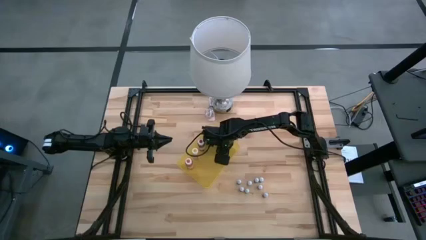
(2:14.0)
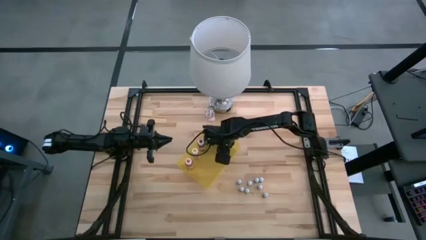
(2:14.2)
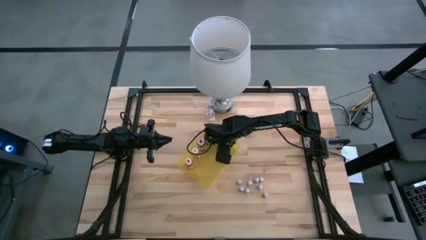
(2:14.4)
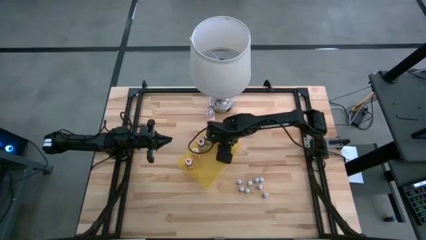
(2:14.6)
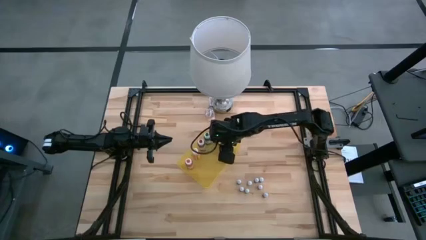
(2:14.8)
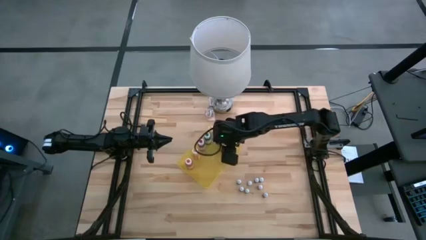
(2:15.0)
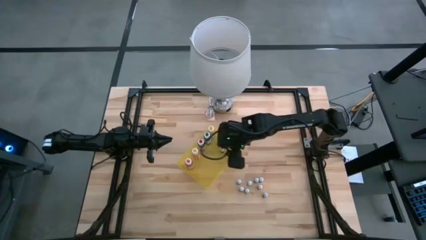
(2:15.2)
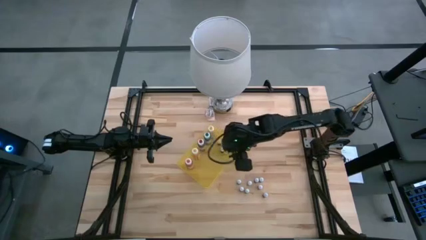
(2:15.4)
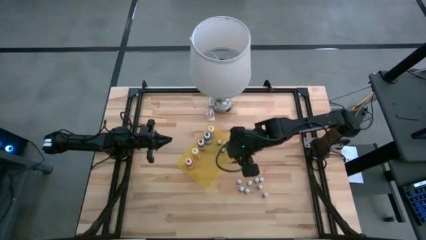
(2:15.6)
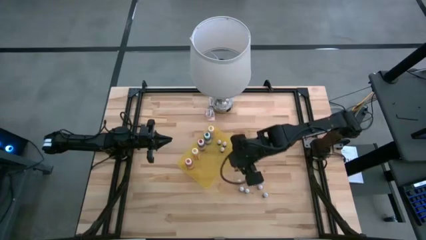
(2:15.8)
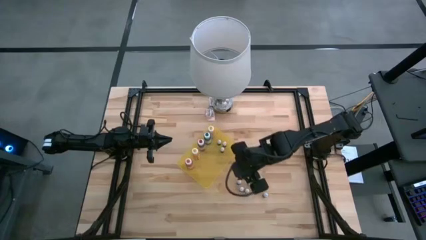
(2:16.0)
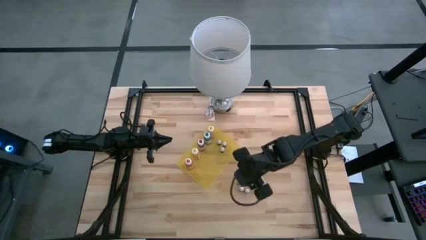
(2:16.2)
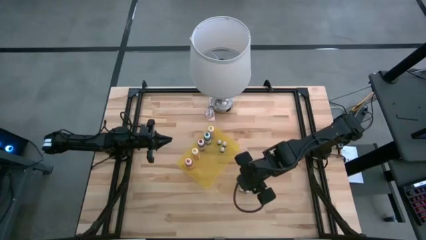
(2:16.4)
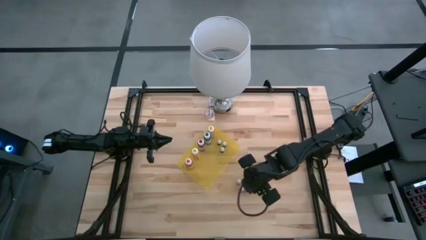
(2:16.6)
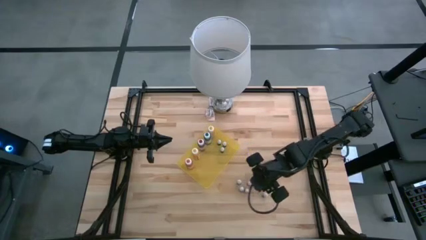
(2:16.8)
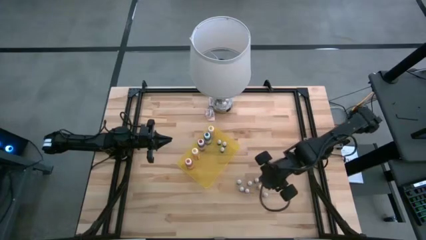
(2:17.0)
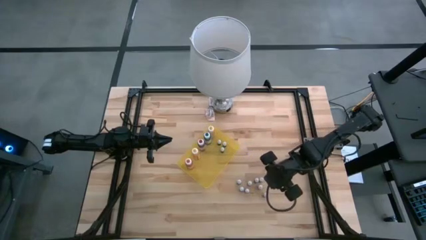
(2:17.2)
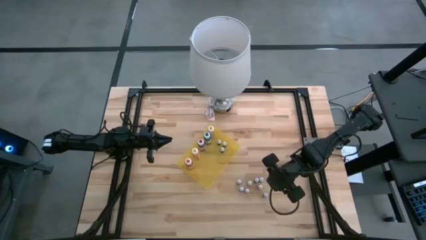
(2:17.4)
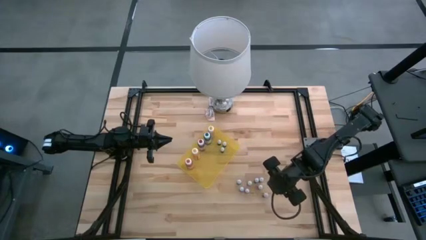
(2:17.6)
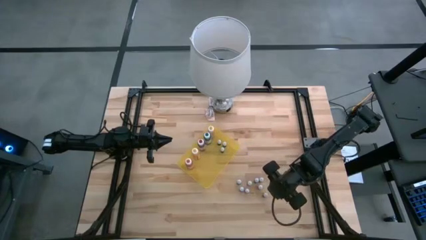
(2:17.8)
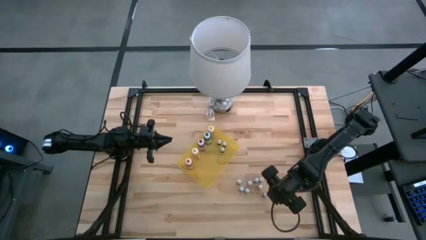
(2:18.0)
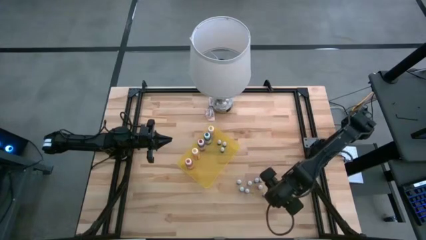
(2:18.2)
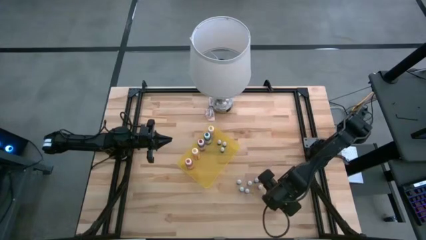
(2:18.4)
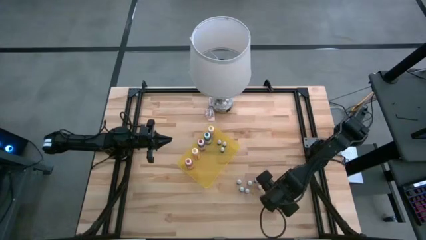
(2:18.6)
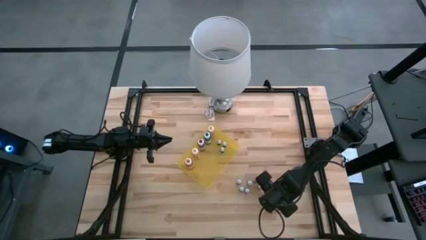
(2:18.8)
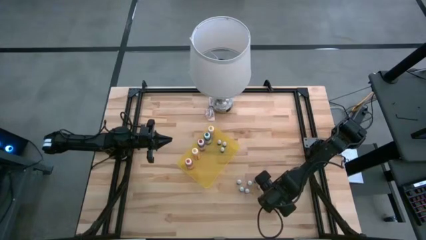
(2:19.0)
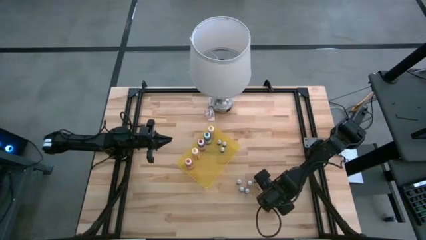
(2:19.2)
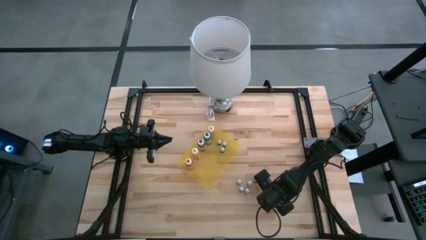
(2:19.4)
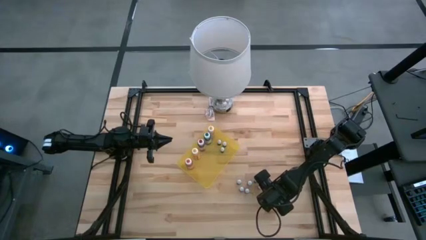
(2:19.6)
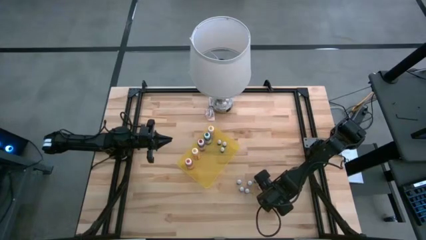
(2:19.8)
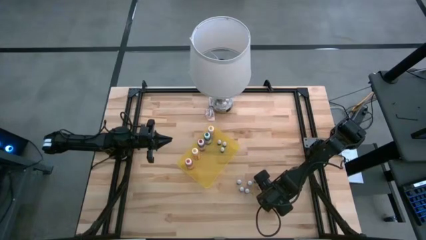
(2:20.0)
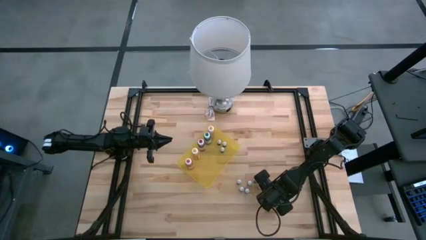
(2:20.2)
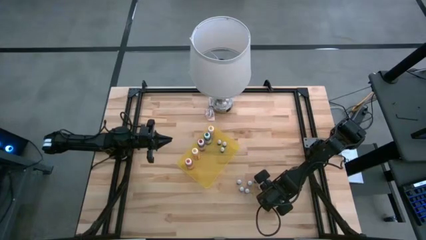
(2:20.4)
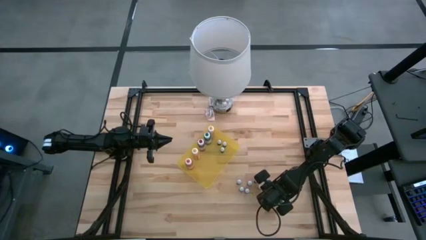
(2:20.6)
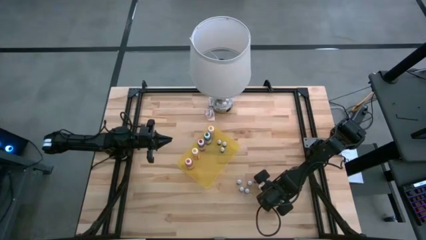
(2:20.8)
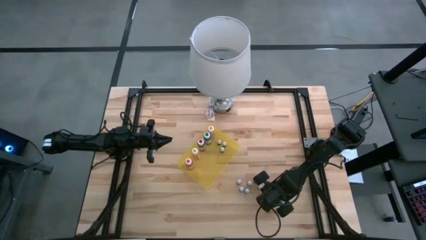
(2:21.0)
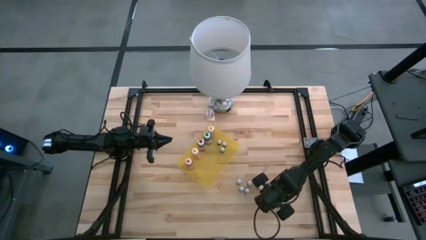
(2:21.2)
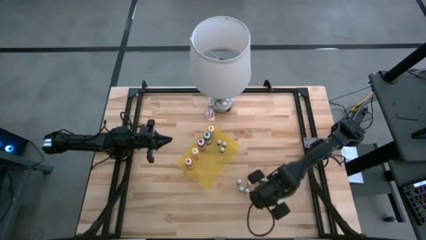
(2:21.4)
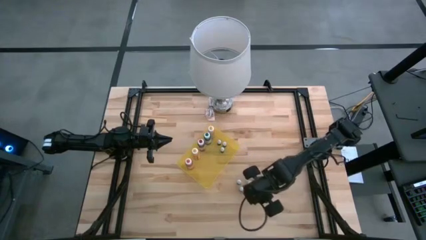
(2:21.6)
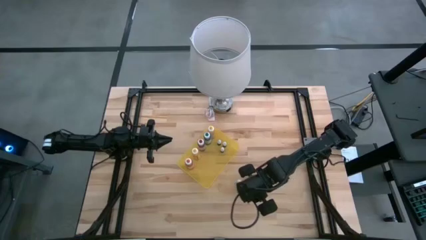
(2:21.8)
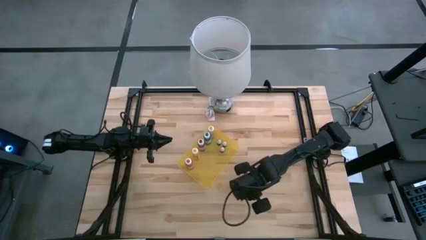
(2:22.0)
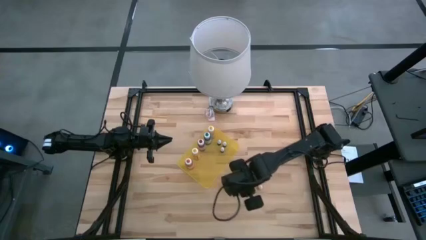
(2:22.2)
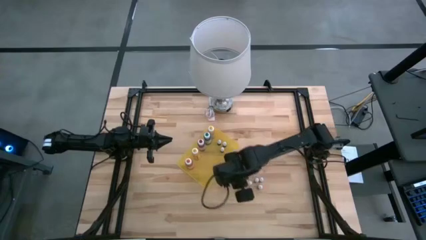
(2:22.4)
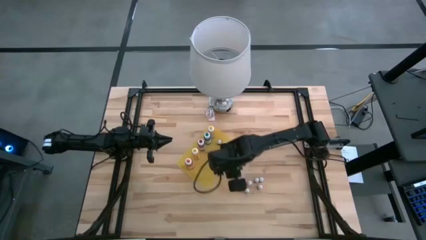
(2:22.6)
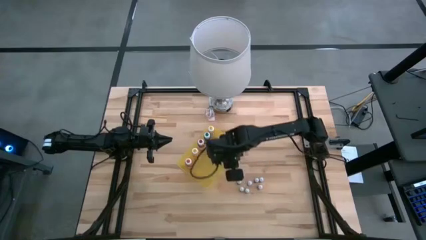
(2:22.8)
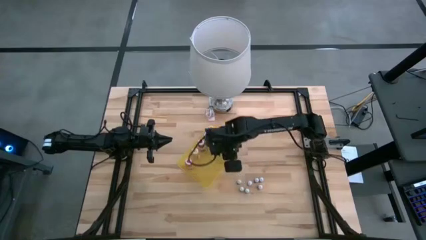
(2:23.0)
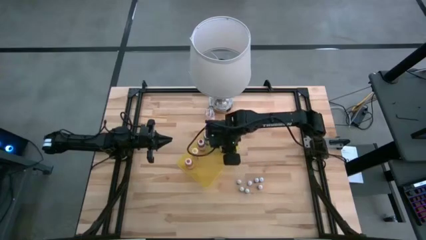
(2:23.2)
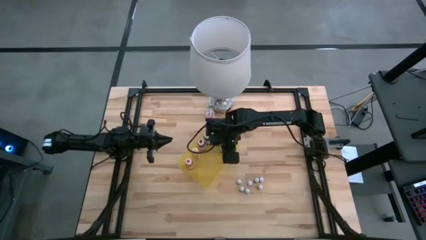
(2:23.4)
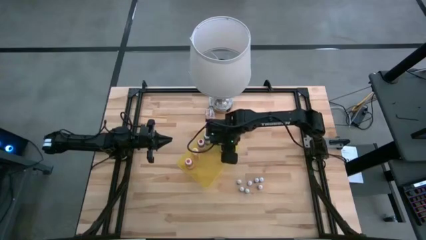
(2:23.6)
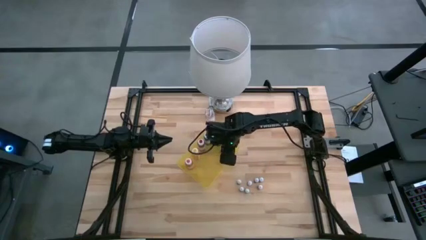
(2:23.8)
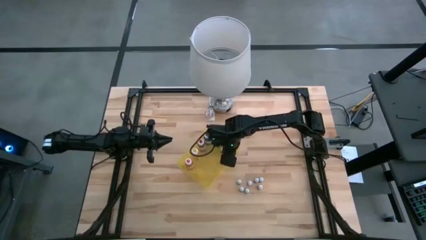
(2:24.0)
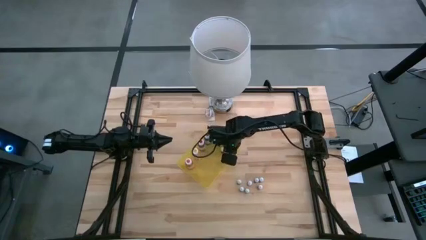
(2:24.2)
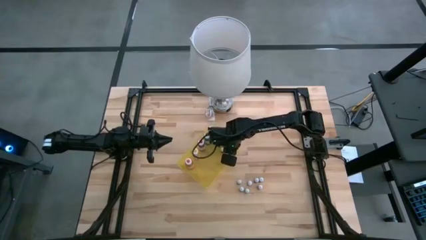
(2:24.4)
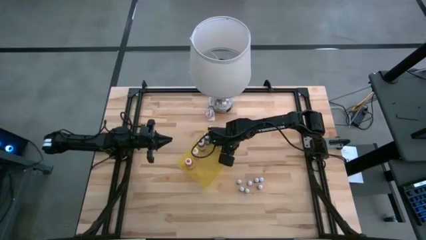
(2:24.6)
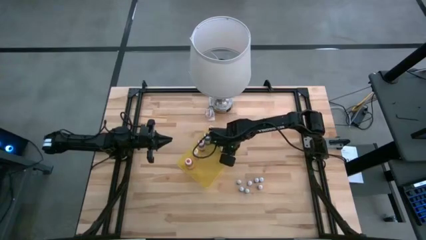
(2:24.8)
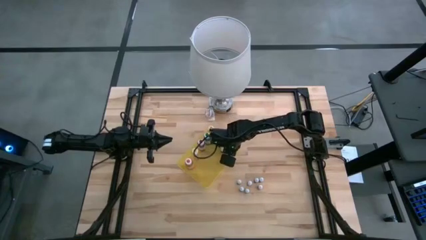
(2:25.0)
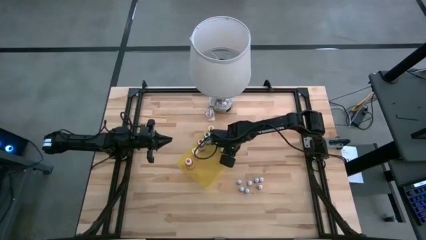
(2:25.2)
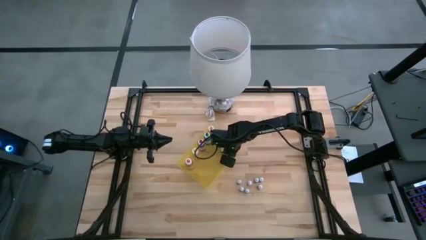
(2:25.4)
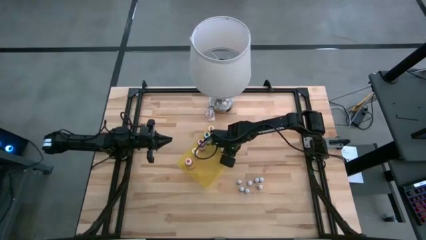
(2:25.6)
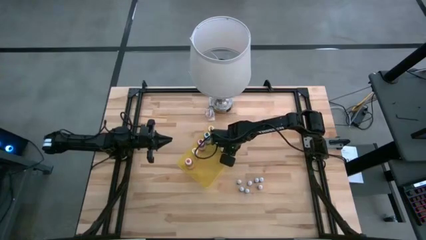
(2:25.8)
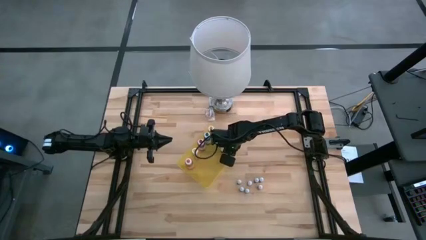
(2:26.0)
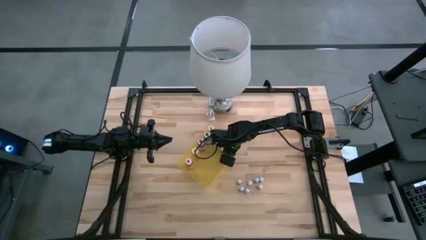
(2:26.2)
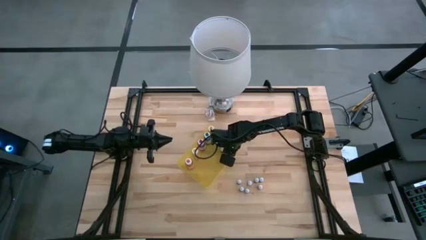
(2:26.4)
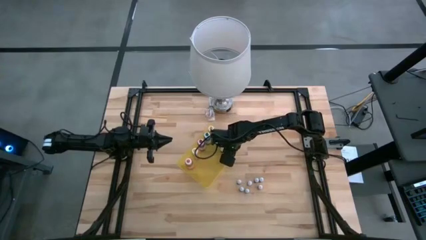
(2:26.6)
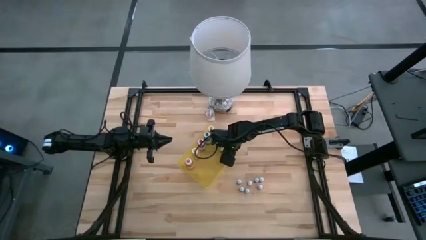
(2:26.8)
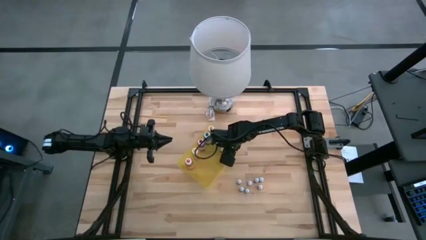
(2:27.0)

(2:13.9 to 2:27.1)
Task: Pick & Place food coloring
Put the small right green food coloring bottle into the yellow bin

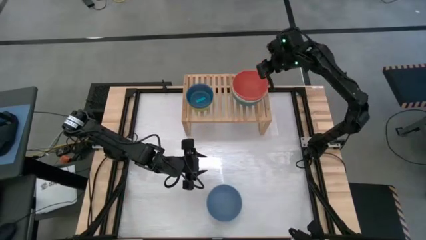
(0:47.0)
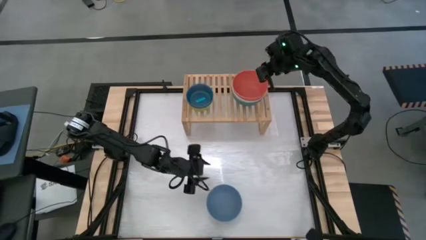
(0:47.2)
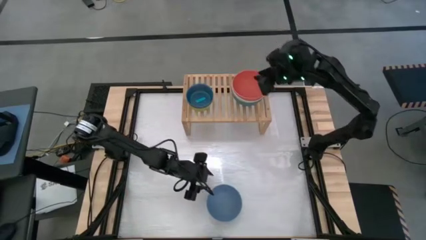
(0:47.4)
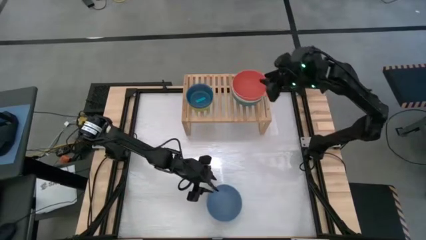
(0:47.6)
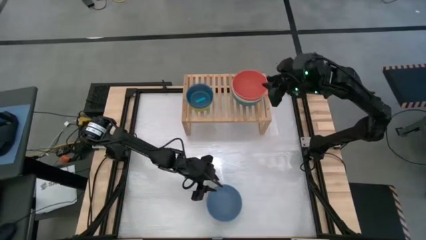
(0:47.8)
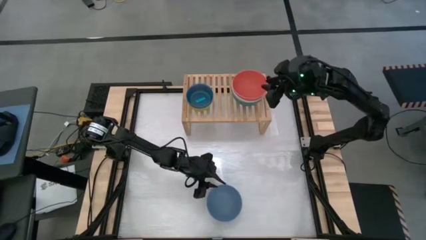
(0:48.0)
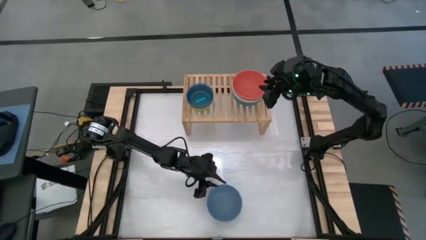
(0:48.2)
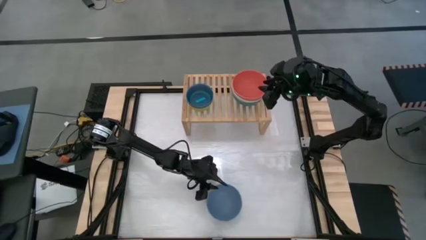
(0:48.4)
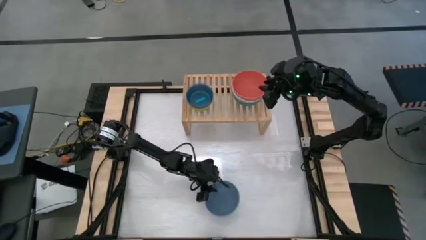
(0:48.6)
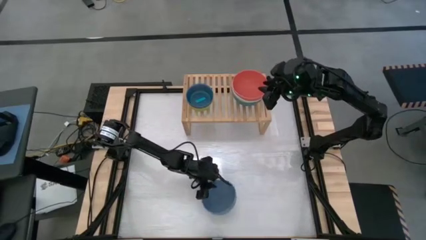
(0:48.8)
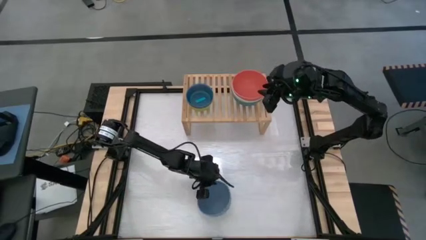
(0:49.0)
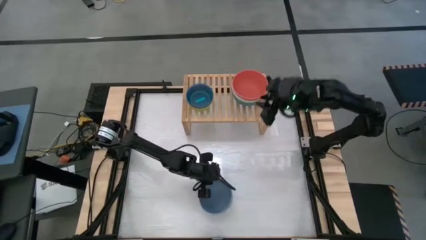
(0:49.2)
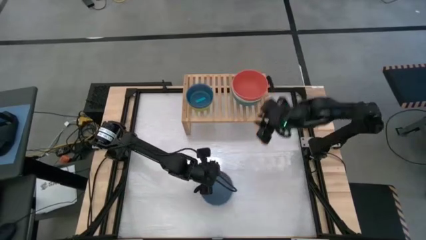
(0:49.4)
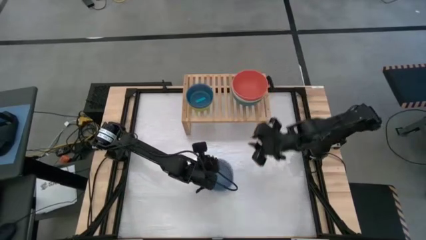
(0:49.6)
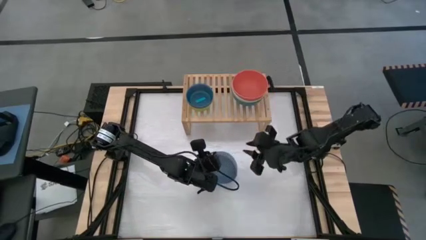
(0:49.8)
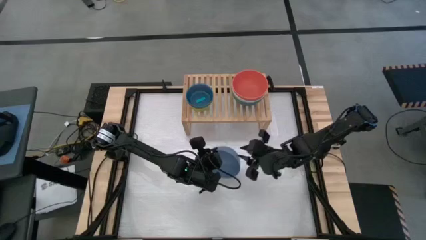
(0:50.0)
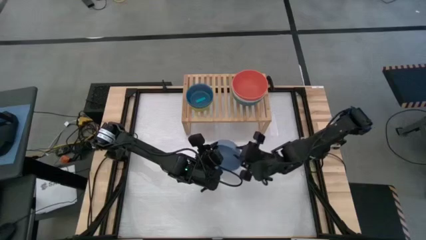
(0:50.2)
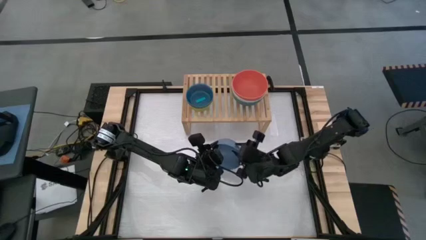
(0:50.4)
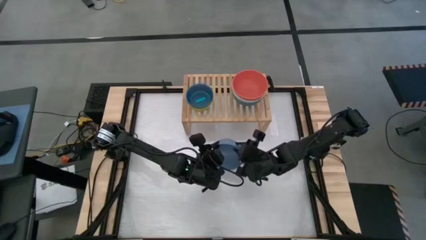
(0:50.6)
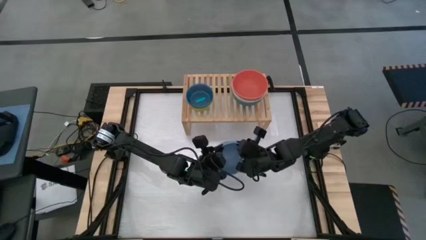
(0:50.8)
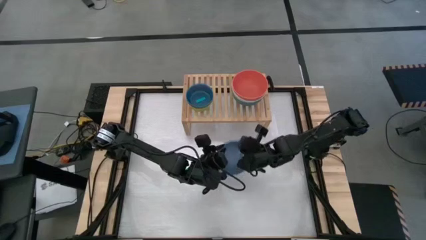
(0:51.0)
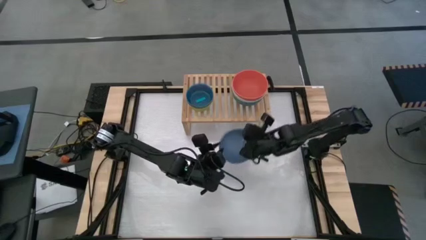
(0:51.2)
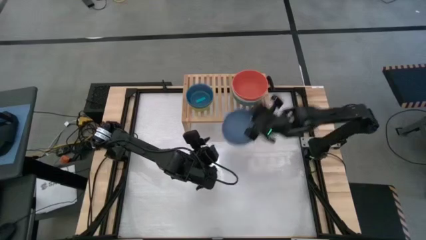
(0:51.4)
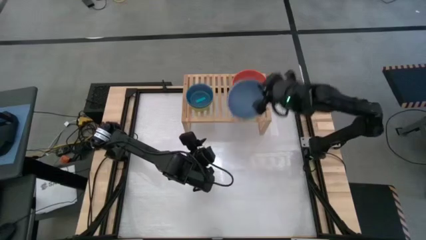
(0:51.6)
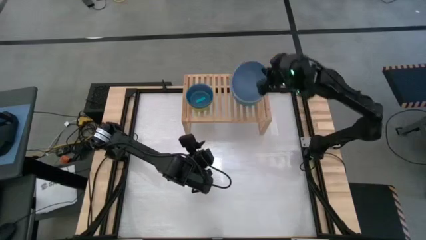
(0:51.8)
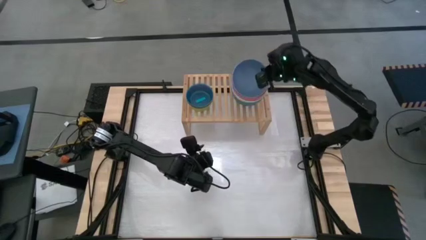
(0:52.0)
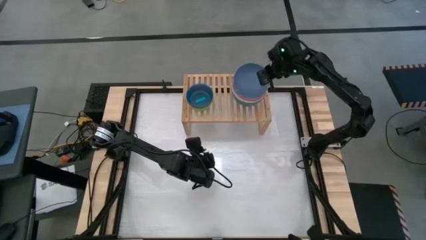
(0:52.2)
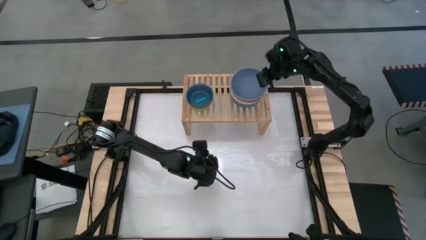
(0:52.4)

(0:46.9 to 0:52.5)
Task: Place and stack bowls onto a shelf
Stack the blue bowl on top of the orange bowls on the shelf
